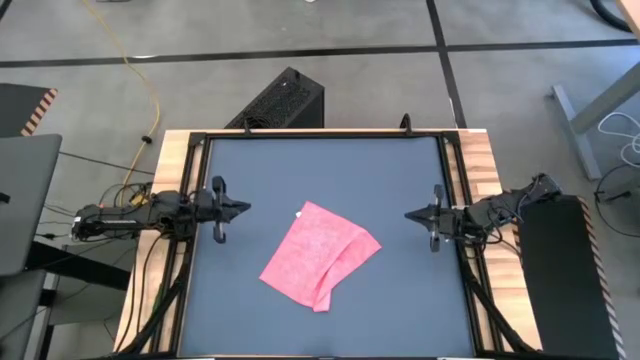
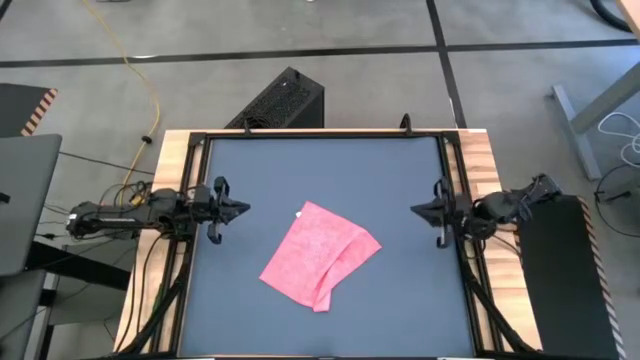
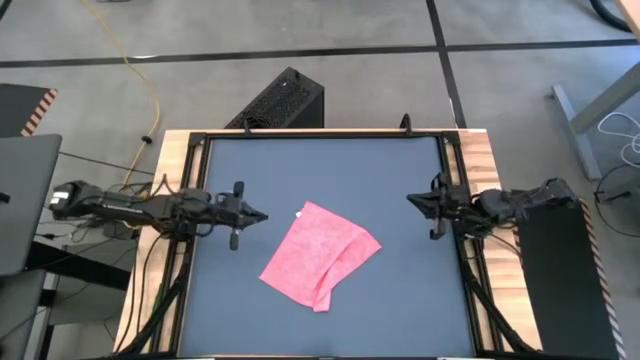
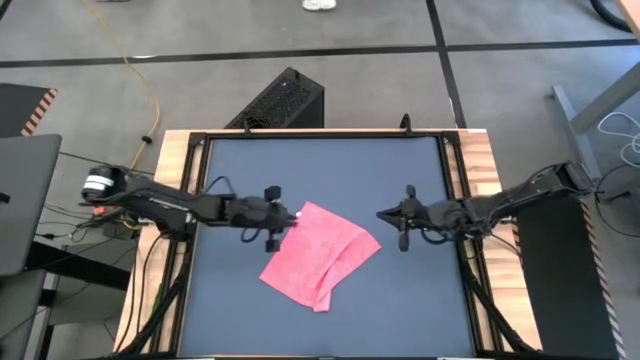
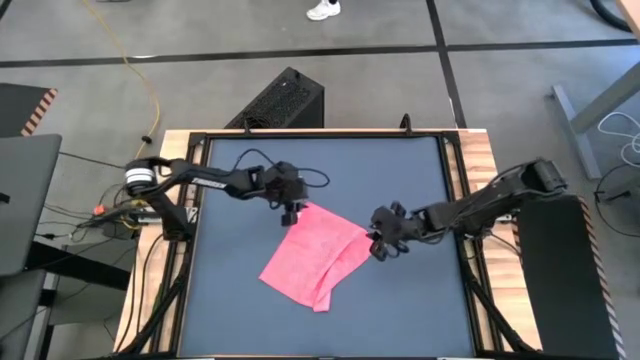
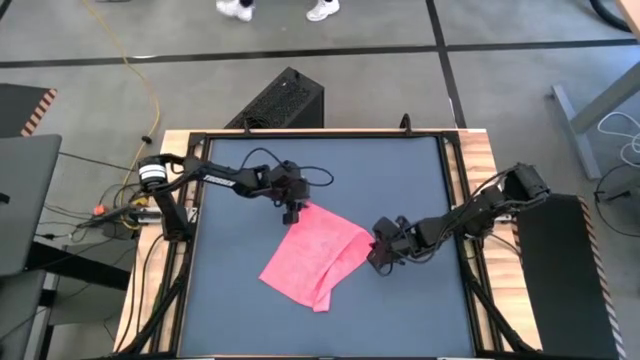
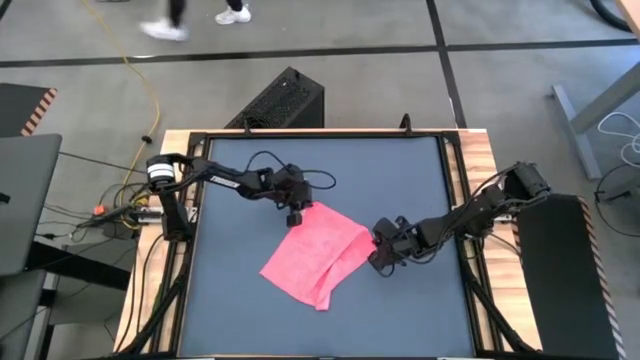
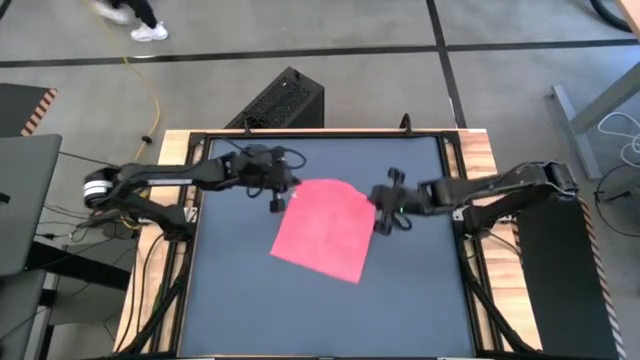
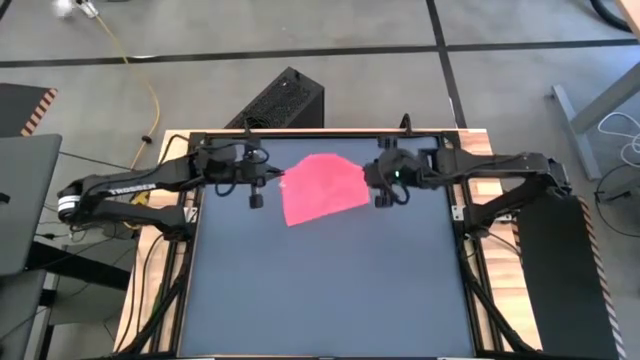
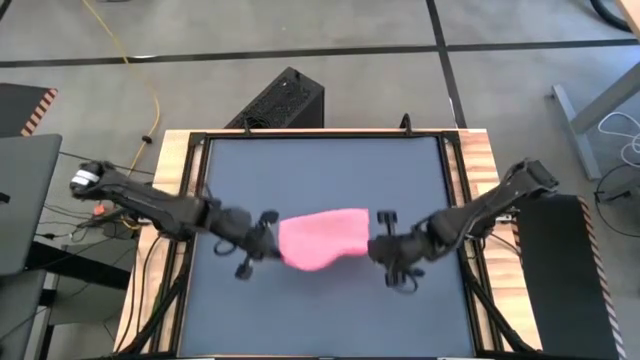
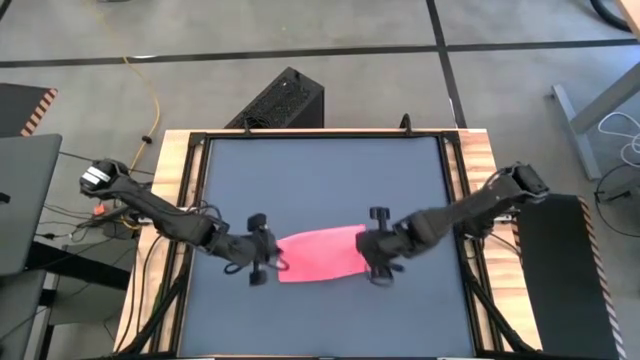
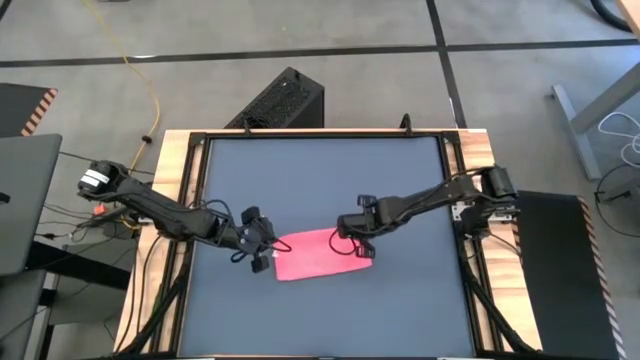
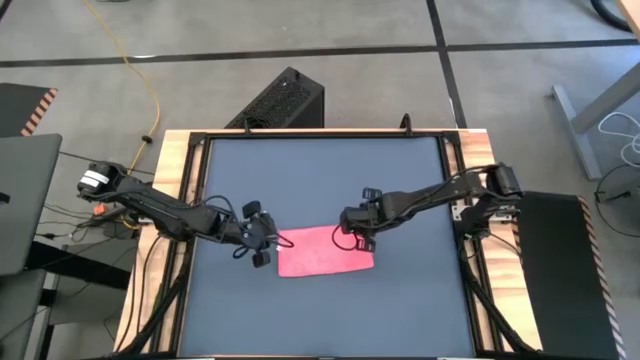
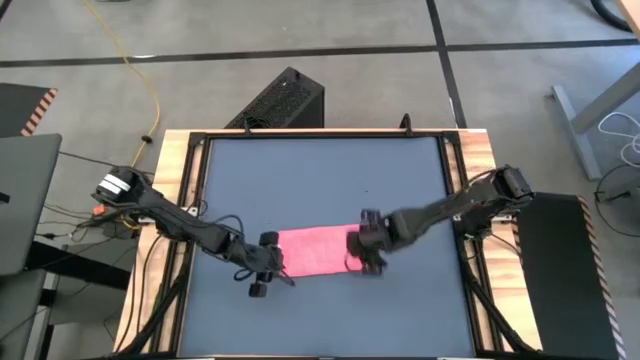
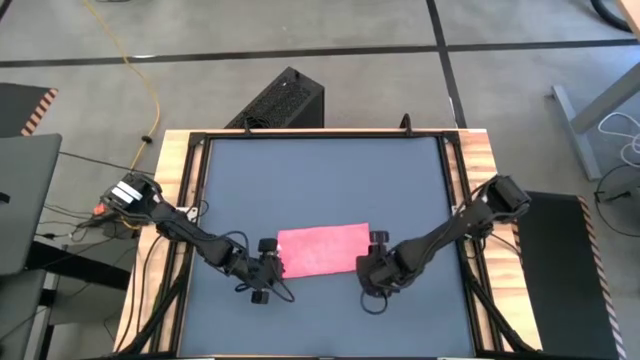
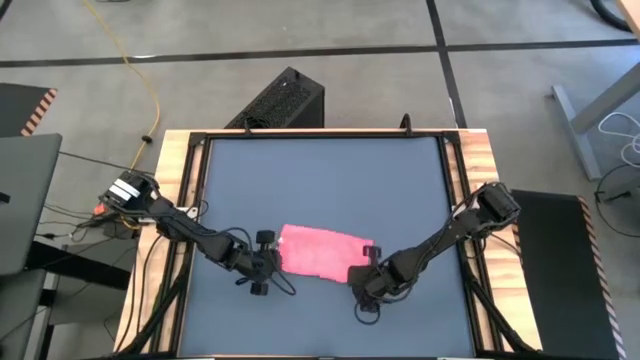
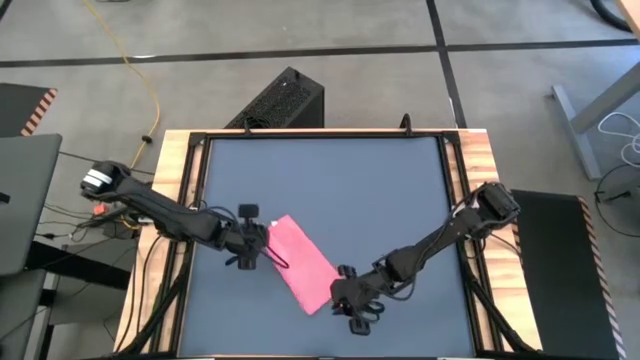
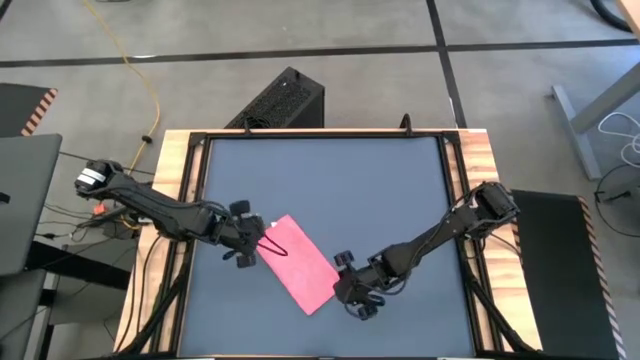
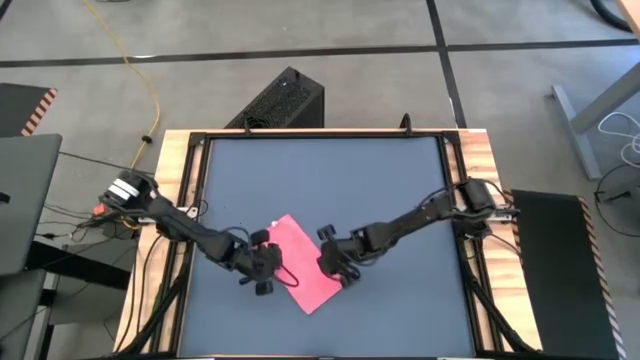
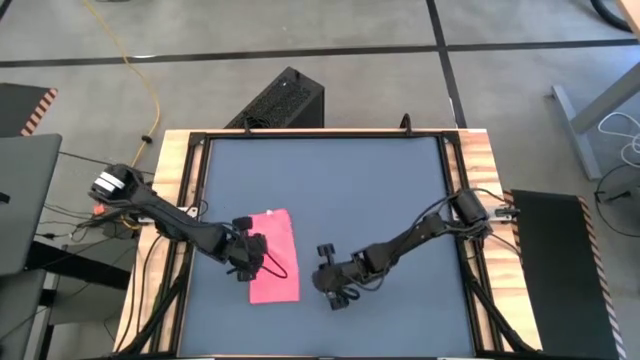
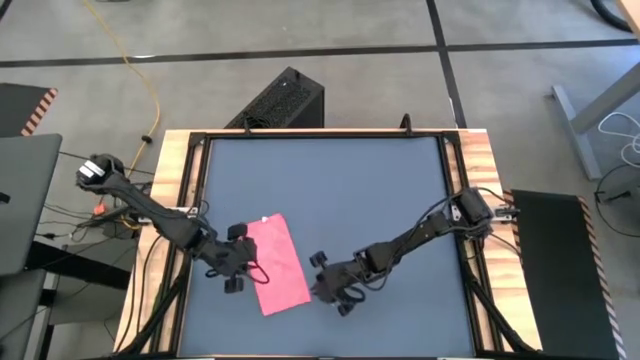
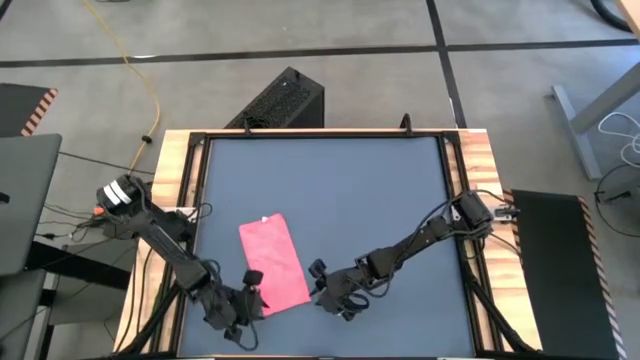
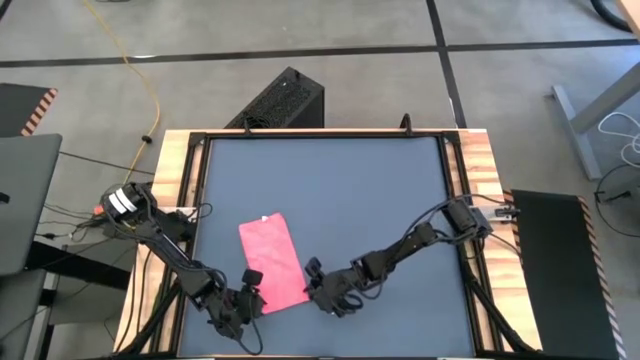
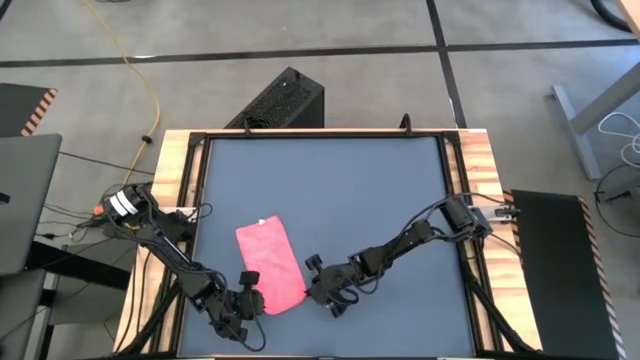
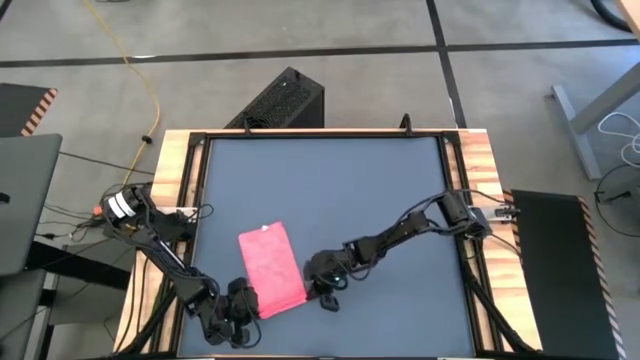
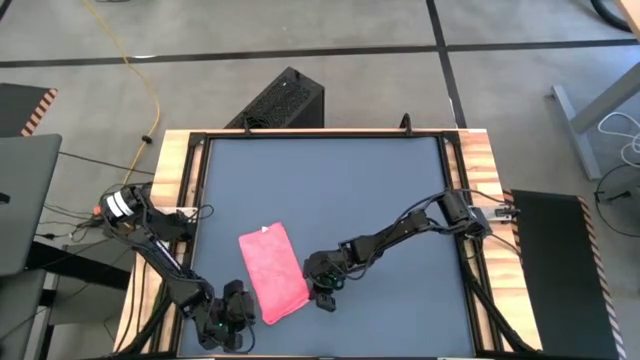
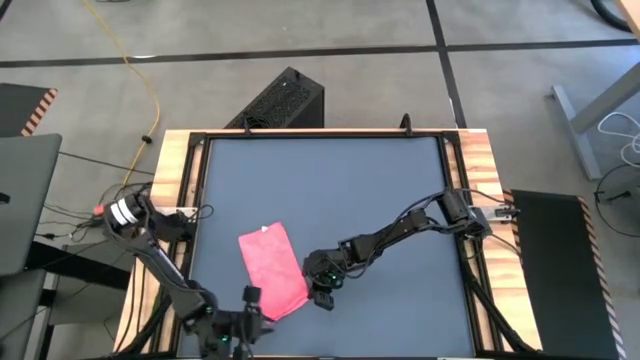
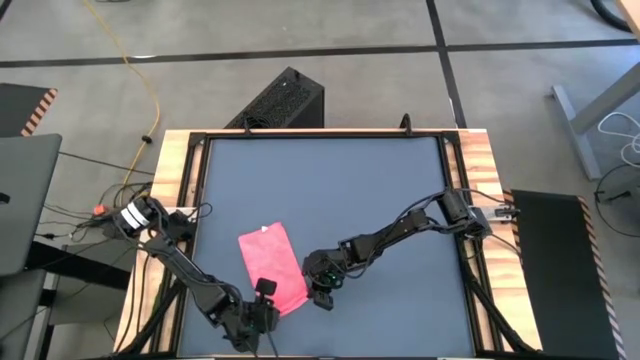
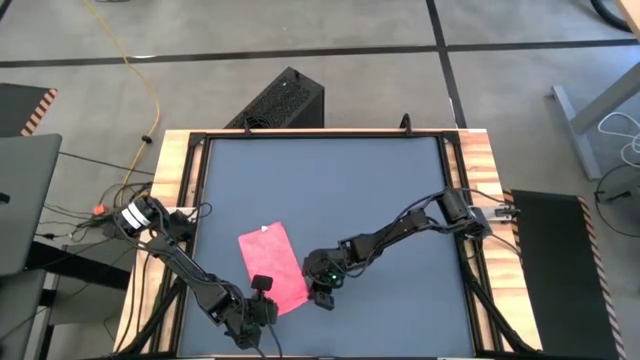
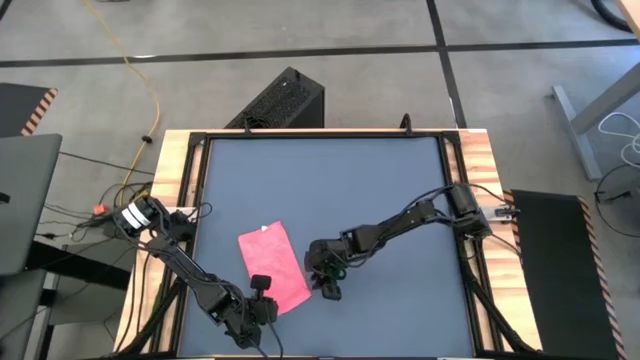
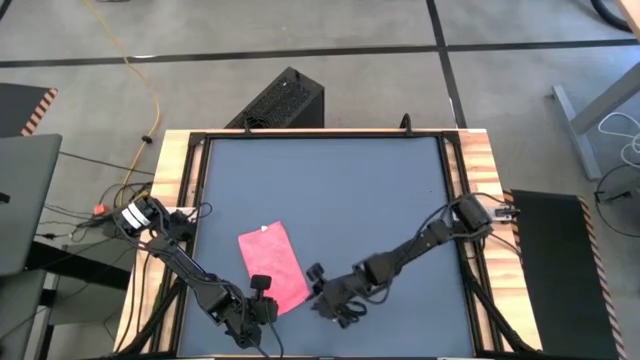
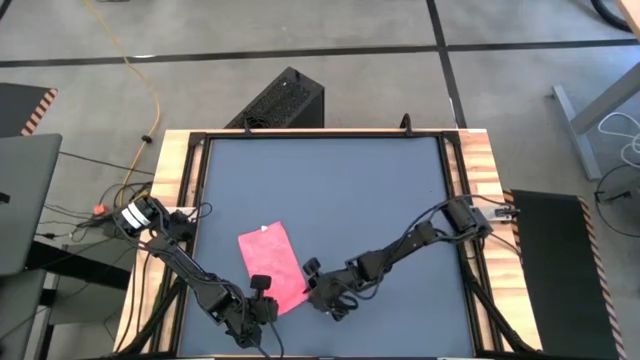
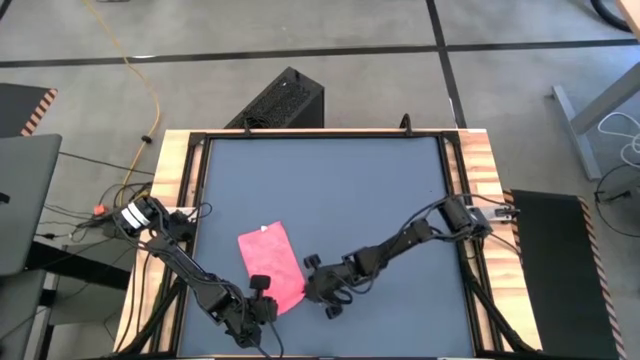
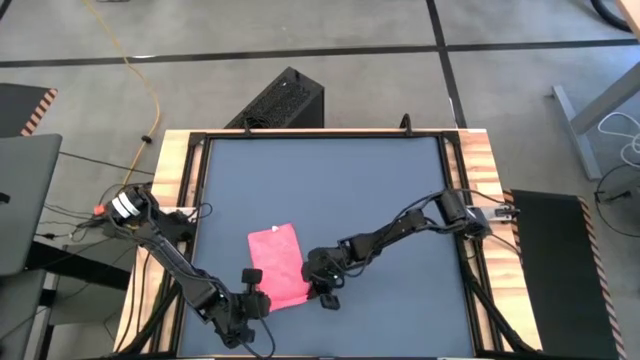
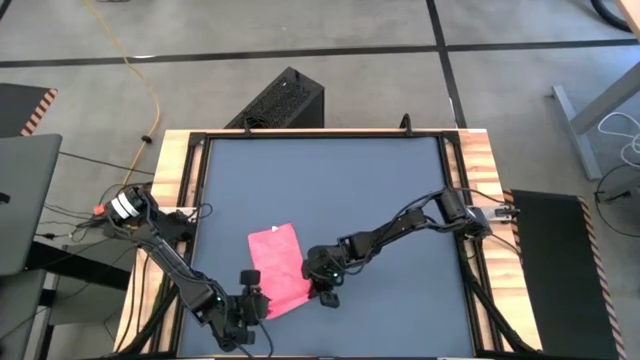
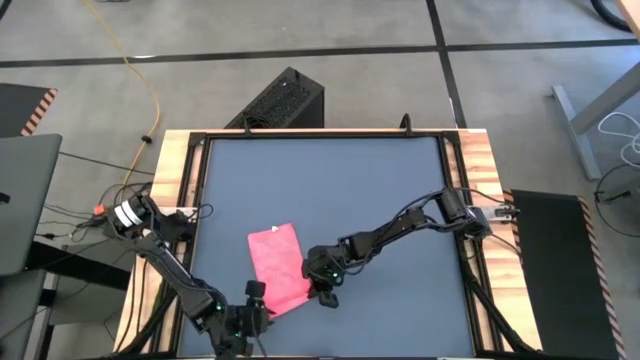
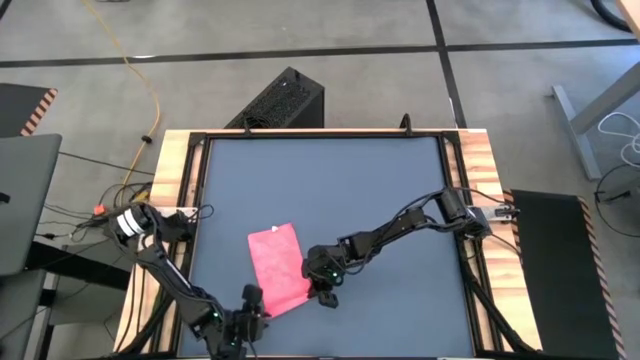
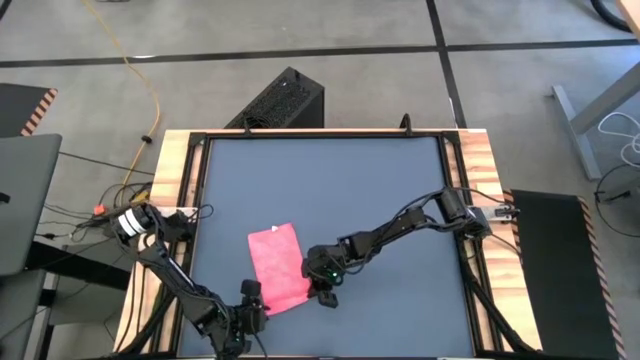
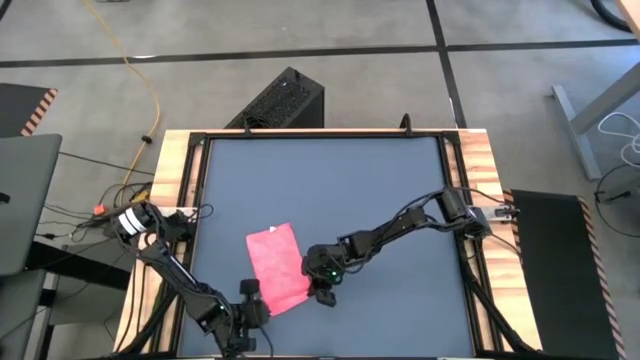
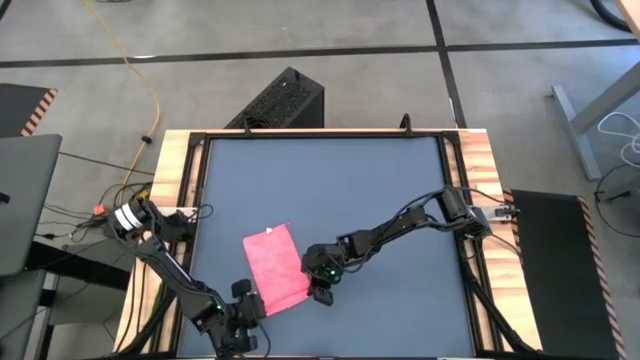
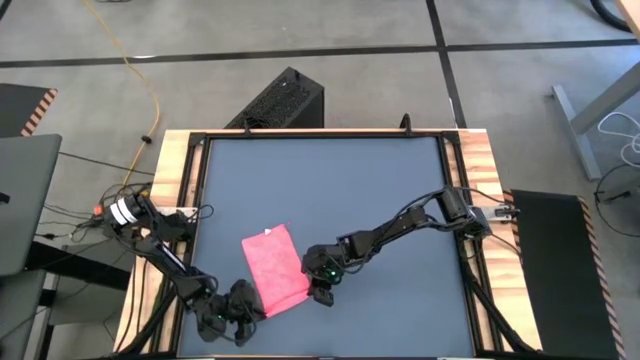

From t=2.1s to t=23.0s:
Task: Roll towel
Roll the red towel
